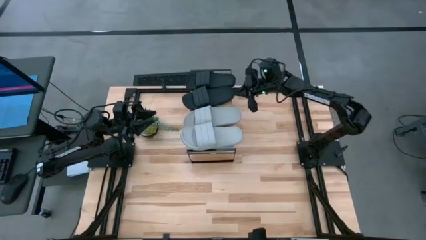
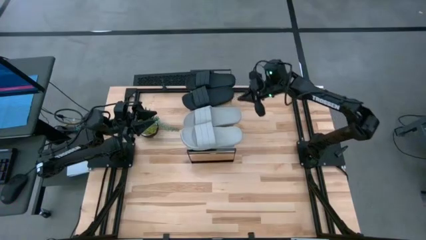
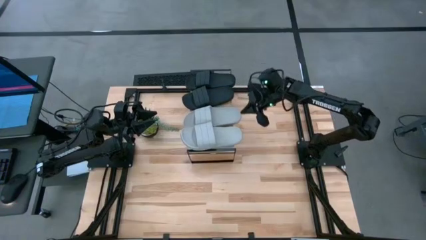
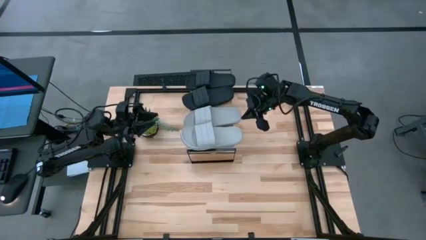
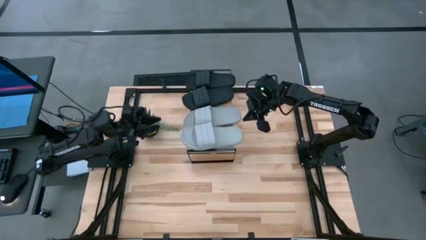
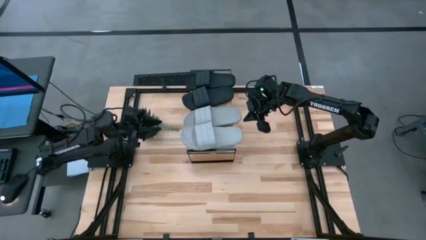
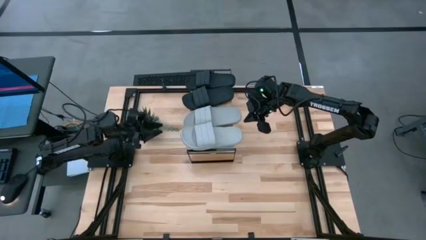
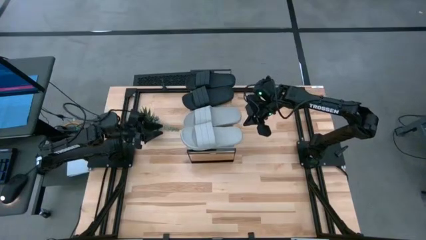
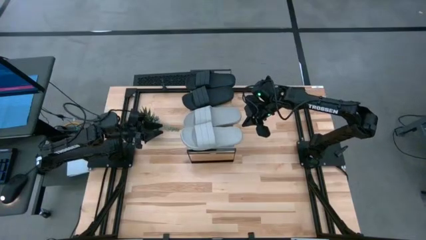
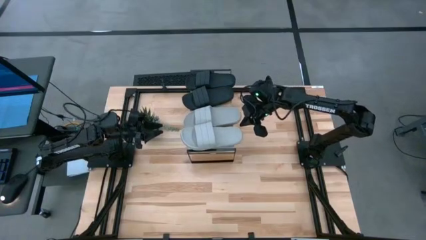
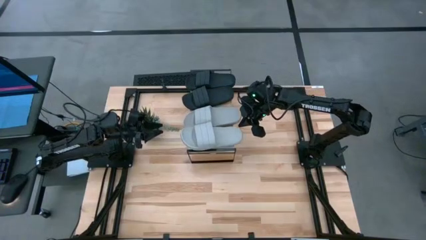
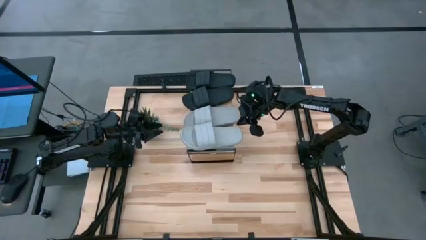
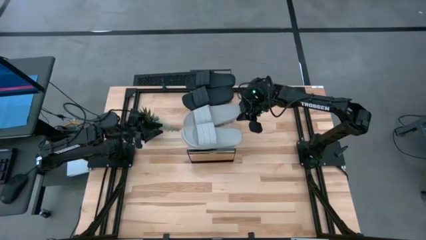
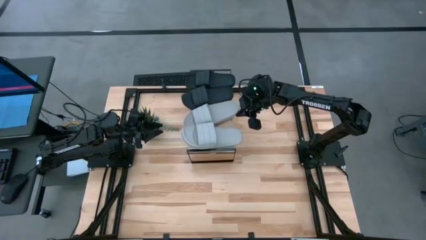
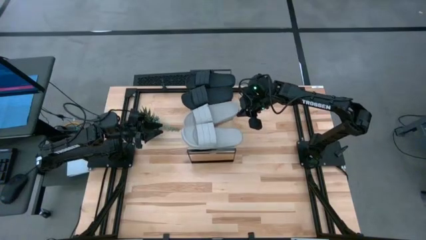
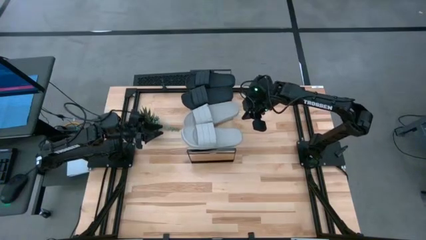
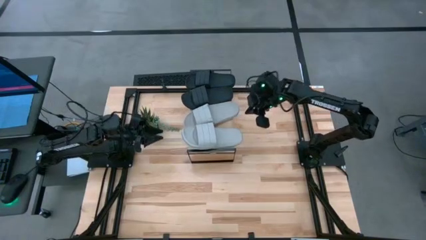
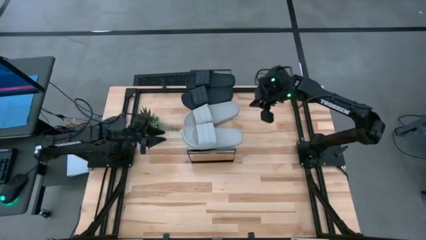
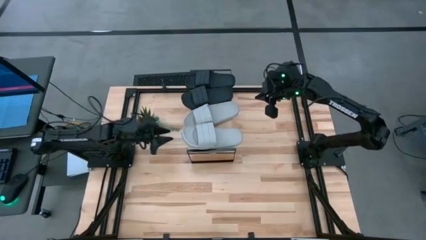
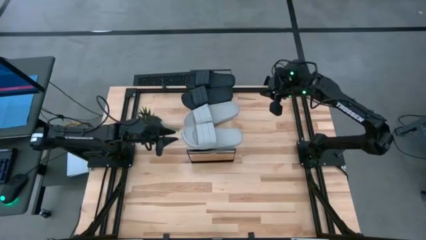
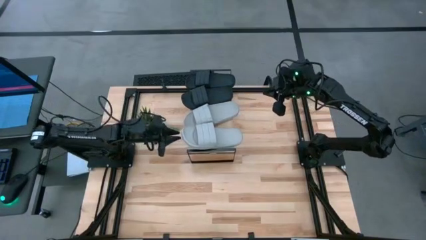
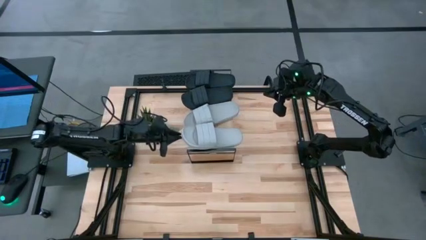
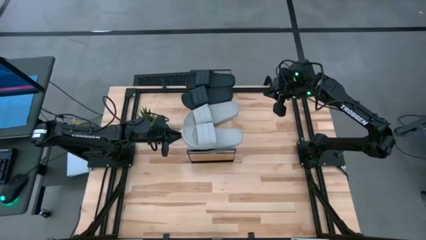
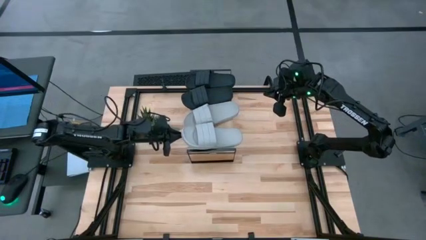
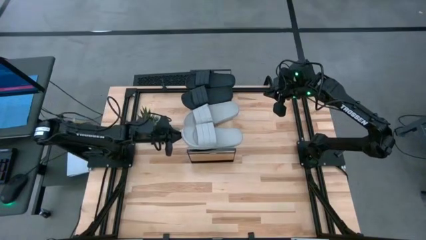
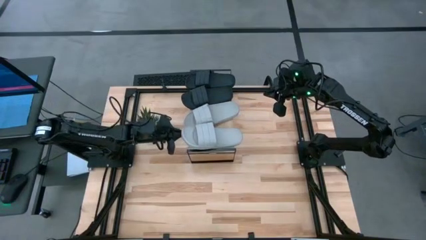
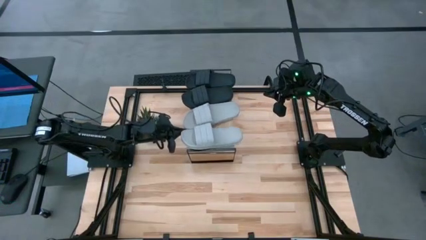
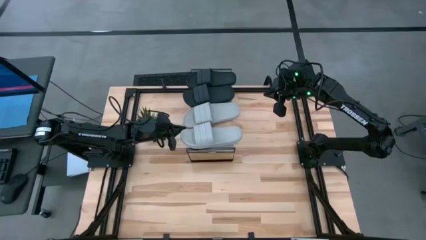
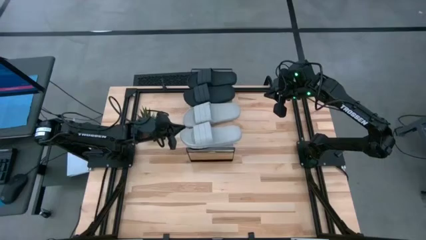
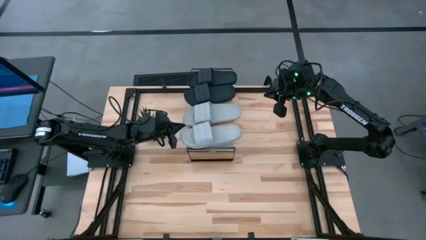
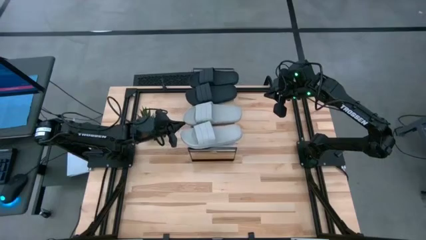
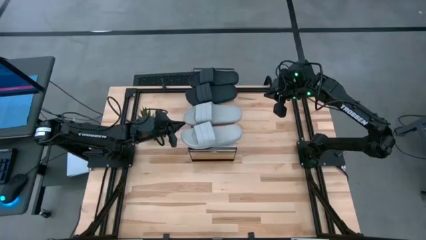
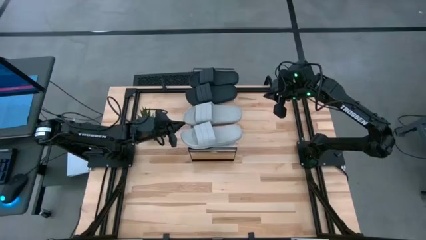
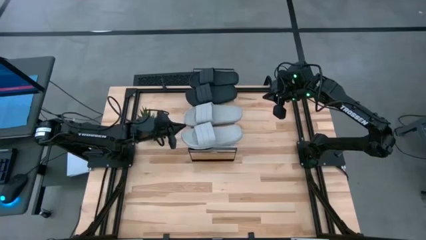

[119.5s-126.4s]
Task: Pick and place slides into the shelf
Adjust the top gray slide on the shelf

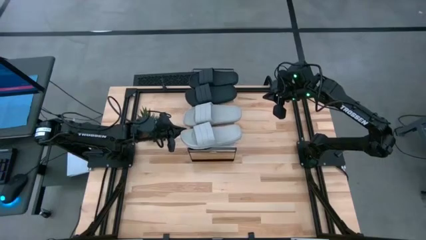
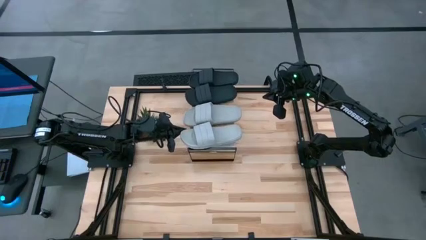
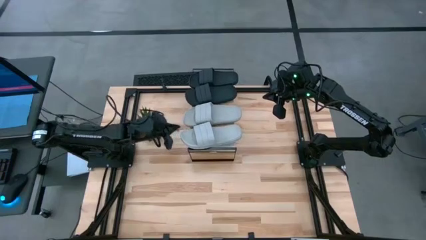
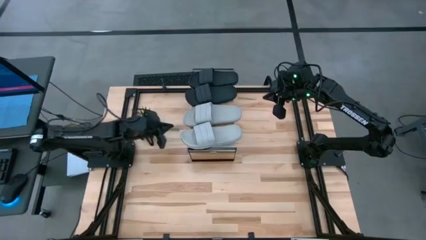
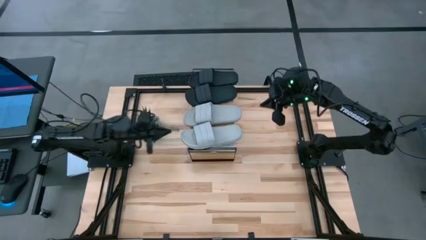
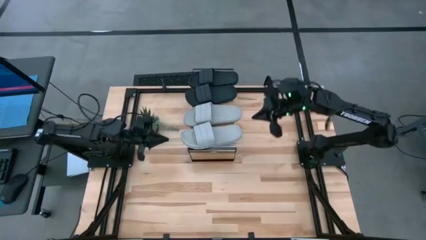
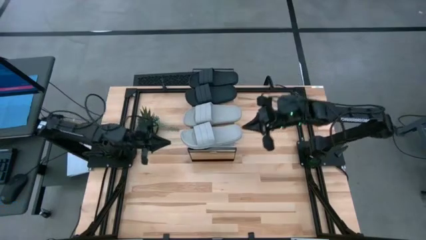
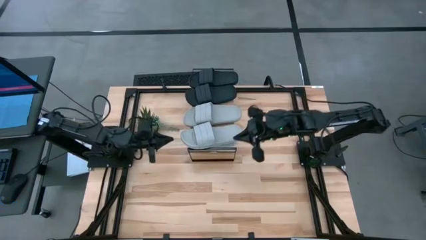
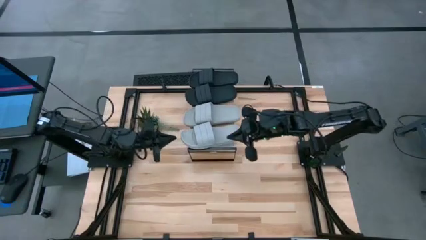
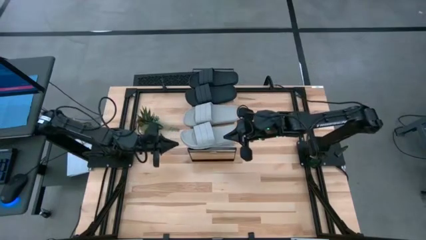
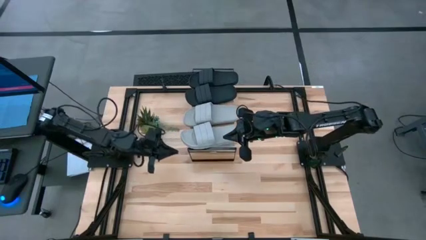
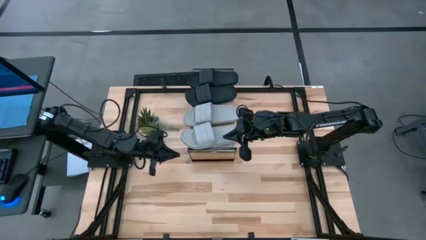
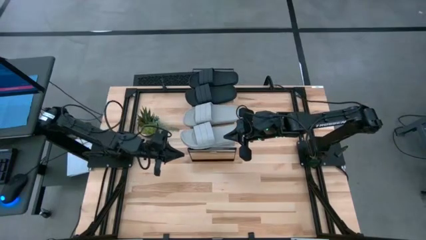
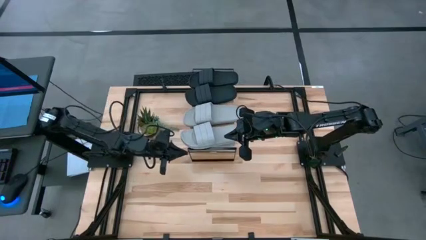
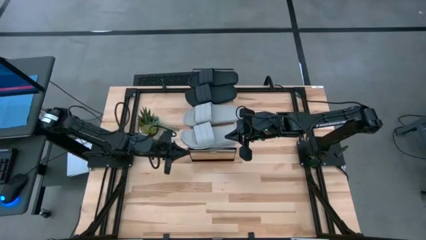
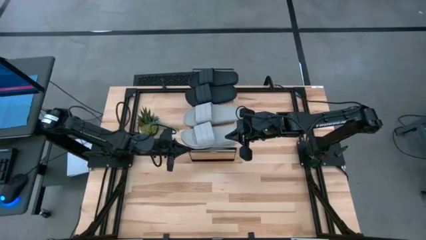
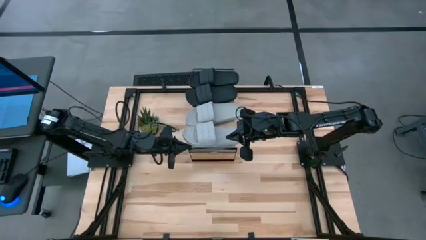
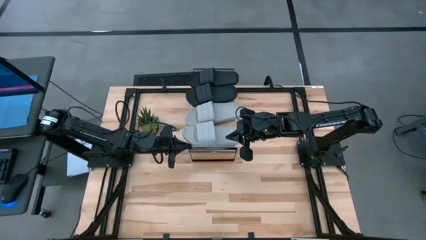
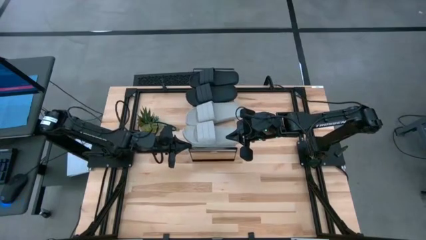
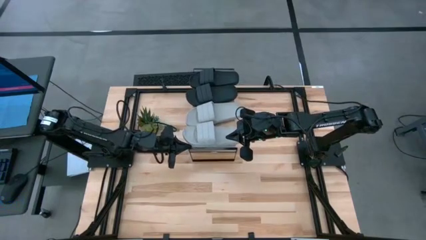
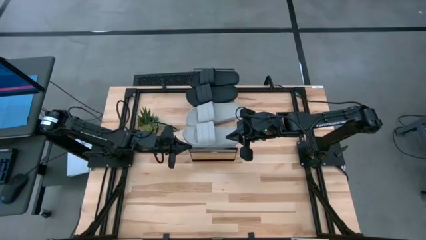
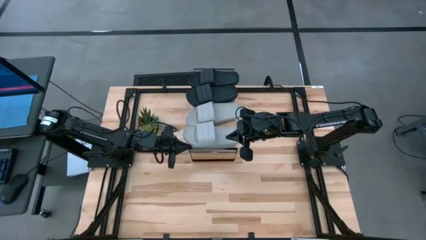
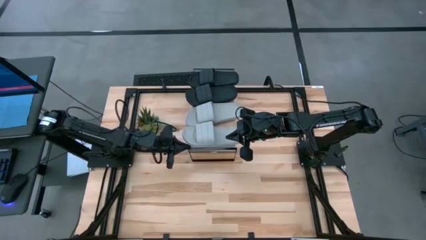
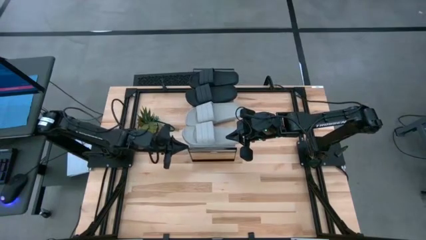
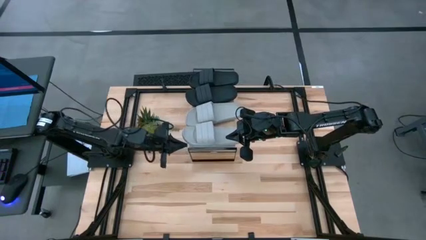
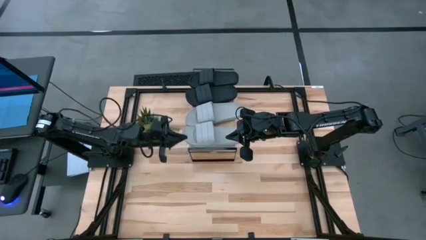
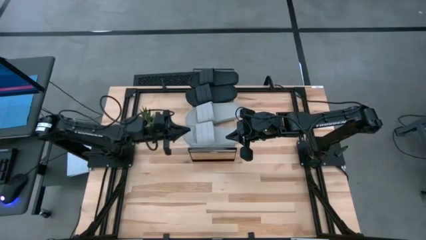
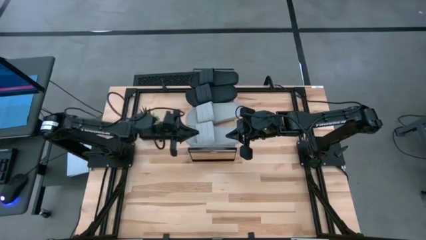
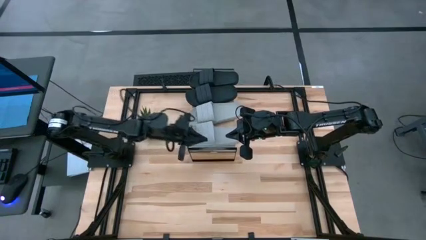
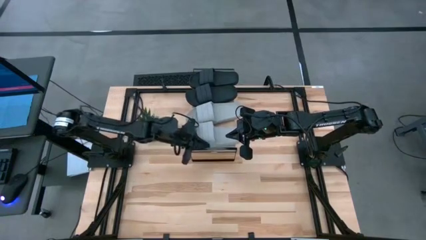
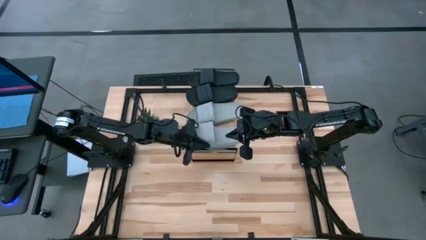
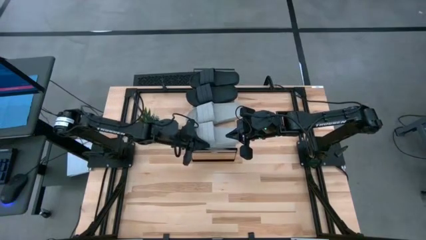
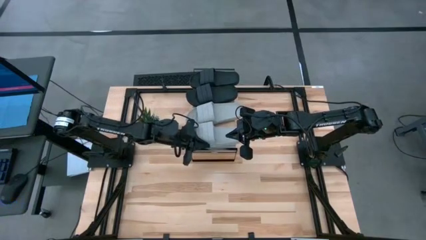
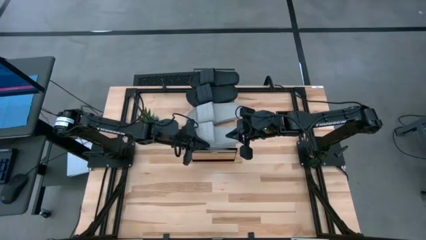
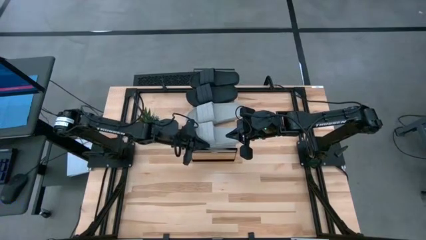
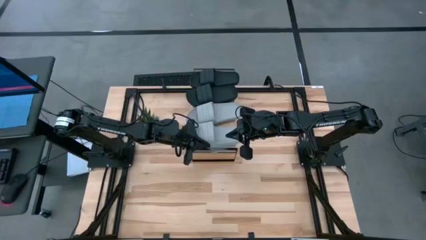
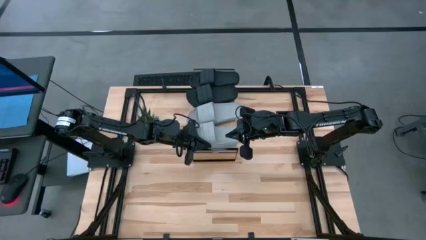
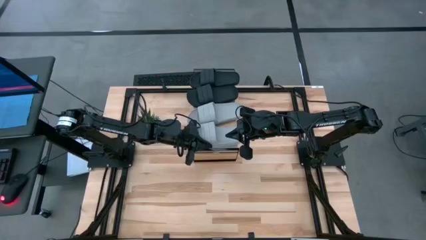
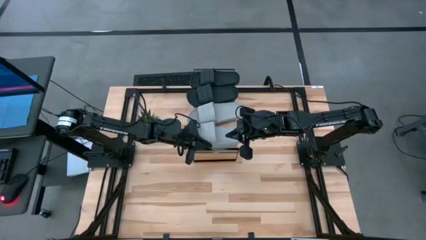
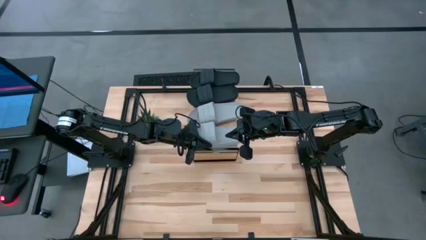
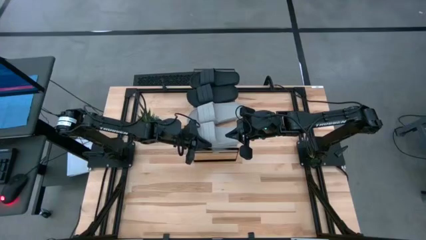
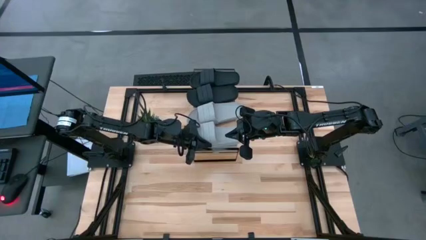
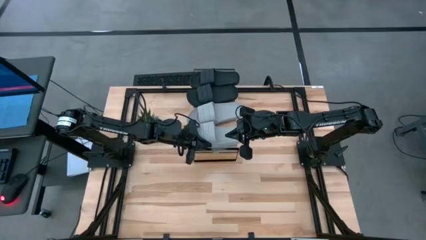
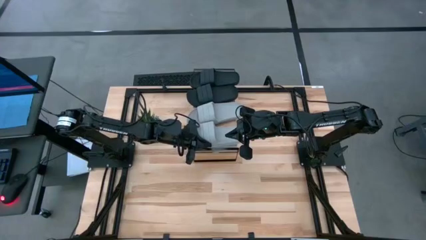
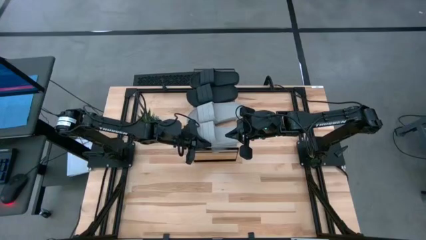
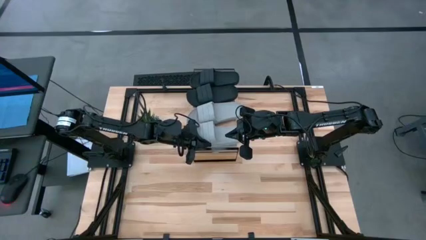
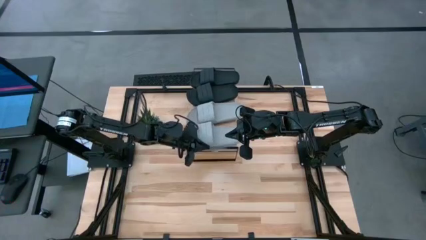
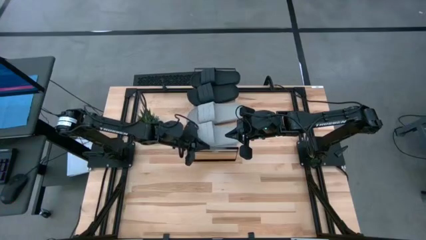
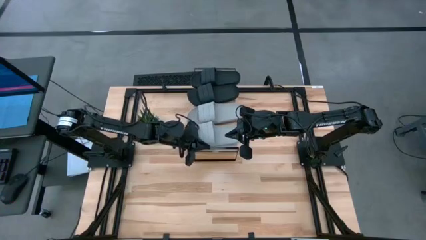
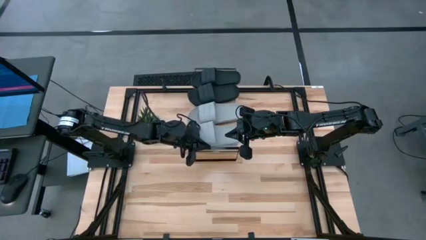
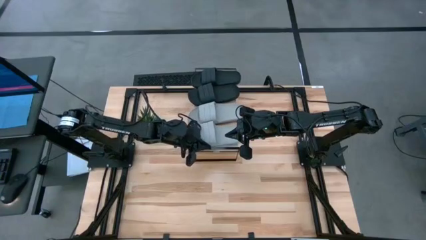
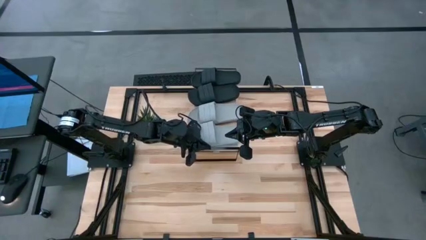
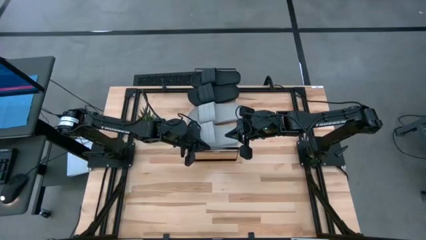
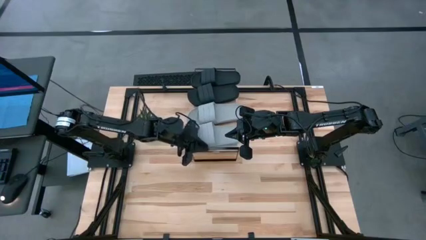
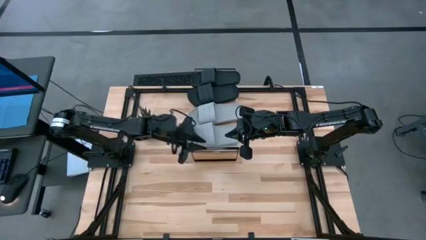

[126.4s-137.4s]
Adjust the bottom gray slide on the shelf
